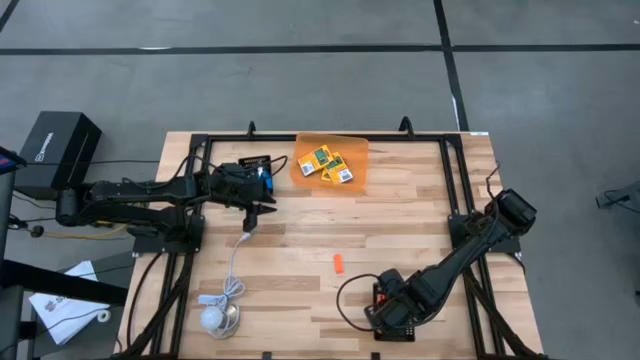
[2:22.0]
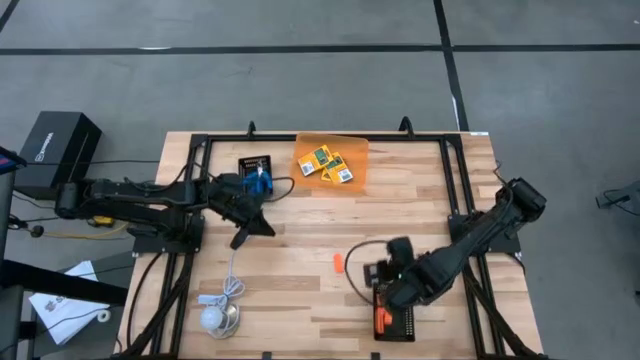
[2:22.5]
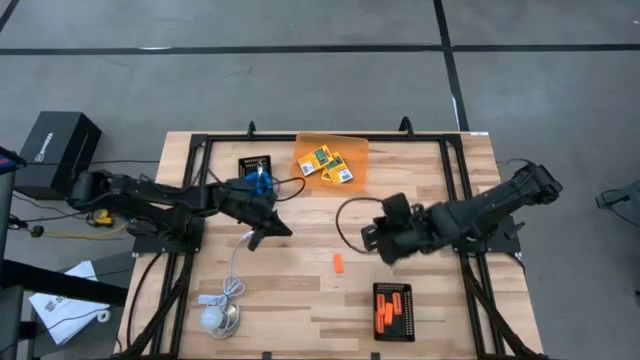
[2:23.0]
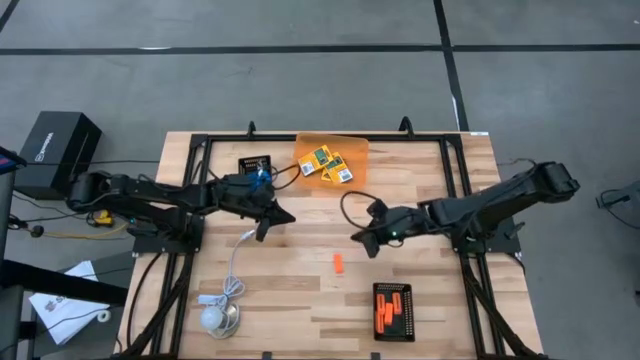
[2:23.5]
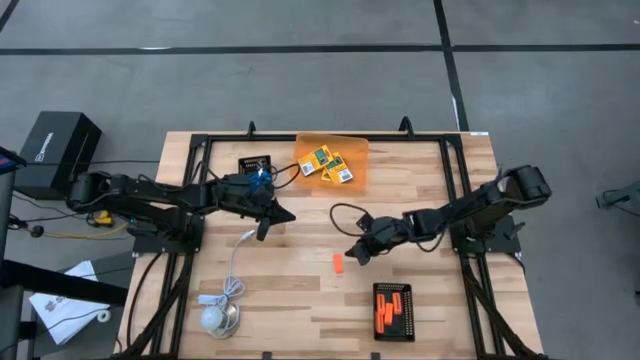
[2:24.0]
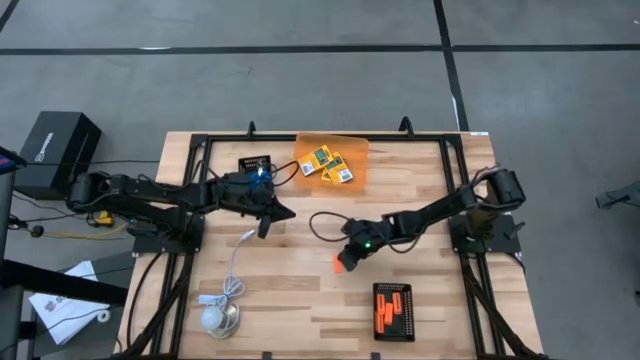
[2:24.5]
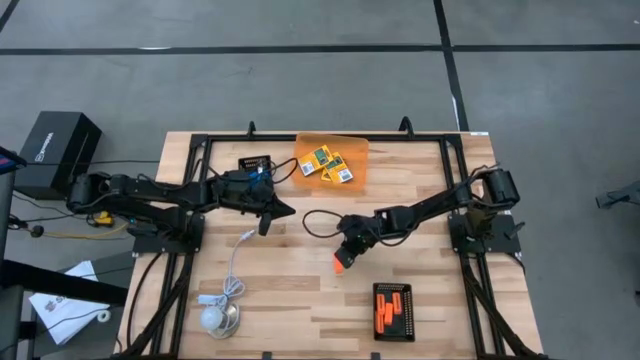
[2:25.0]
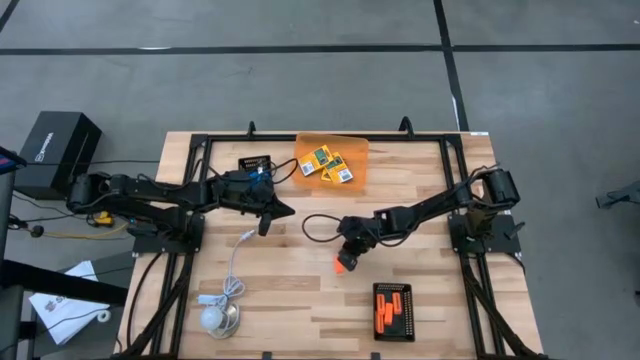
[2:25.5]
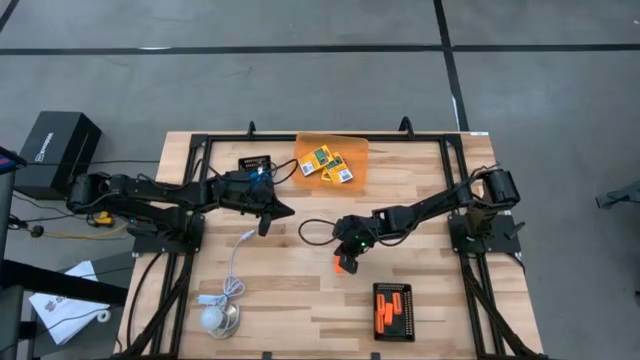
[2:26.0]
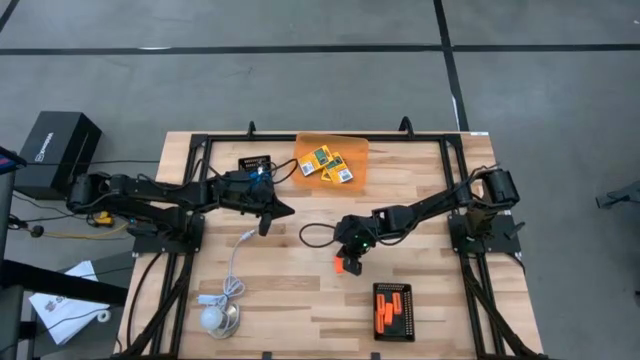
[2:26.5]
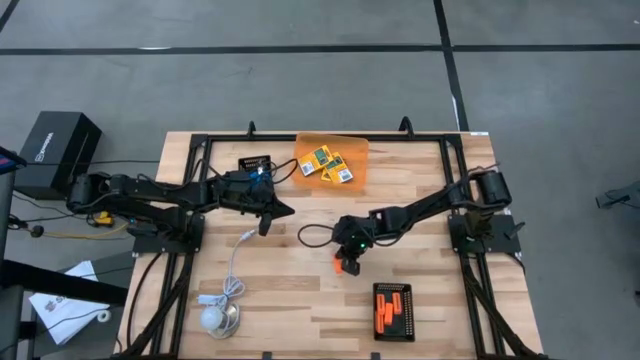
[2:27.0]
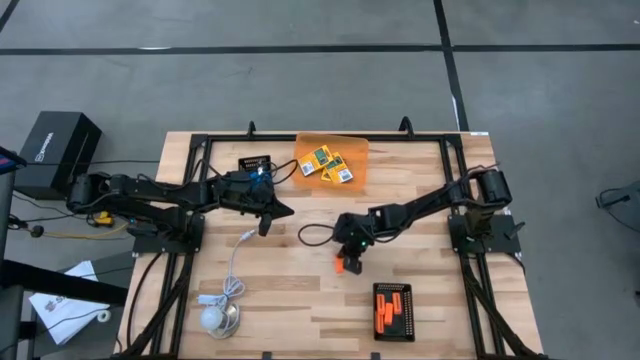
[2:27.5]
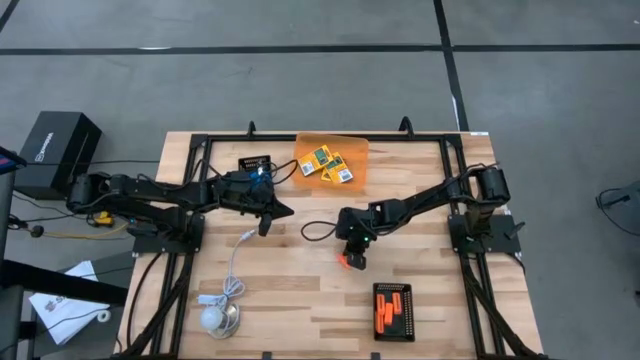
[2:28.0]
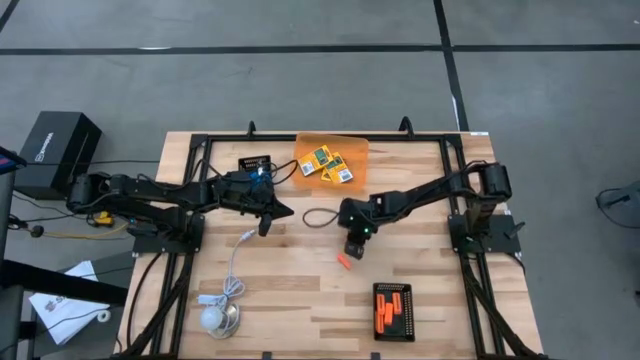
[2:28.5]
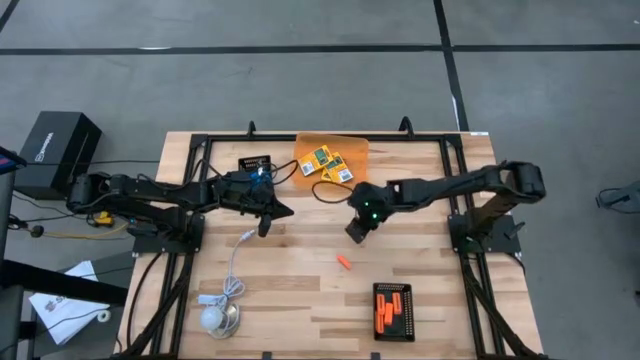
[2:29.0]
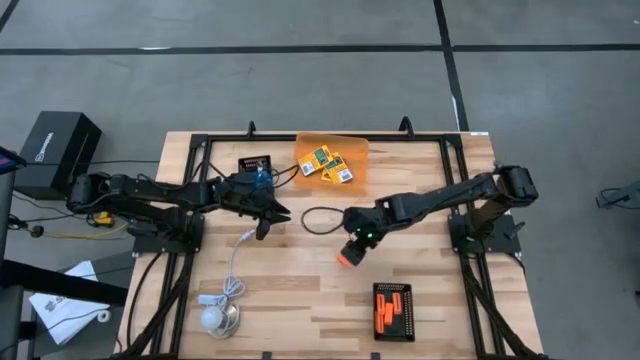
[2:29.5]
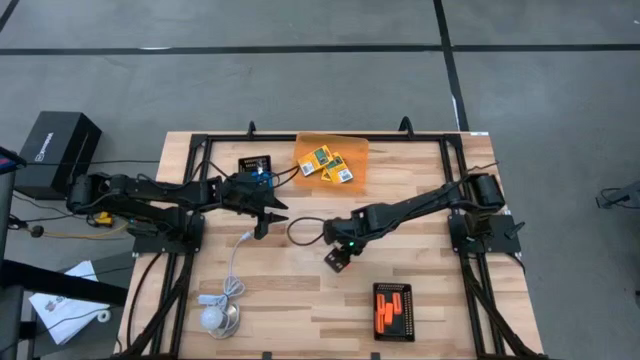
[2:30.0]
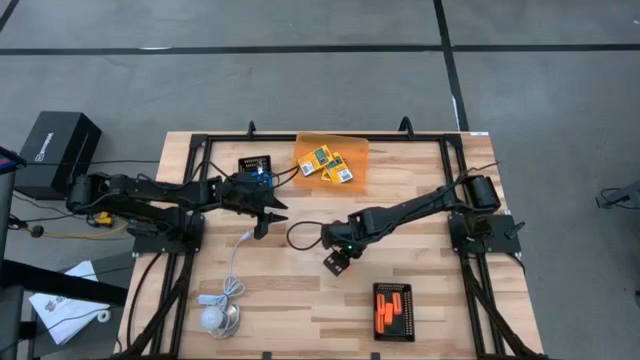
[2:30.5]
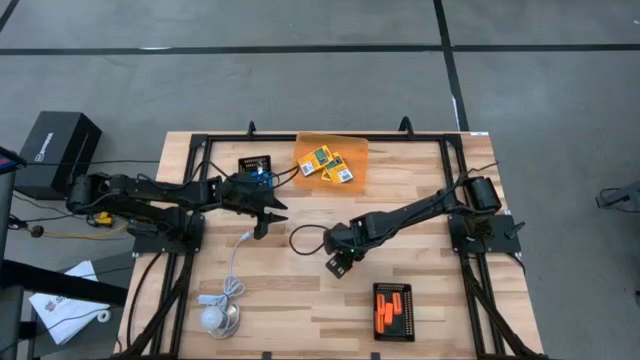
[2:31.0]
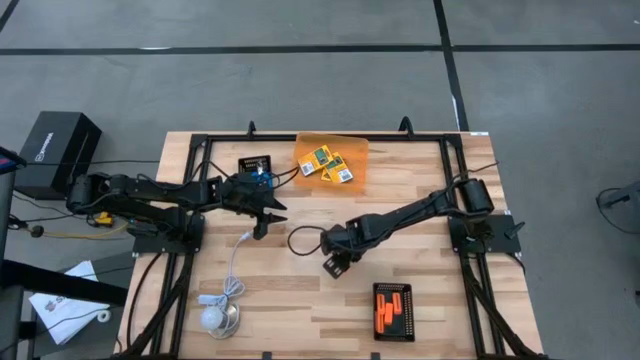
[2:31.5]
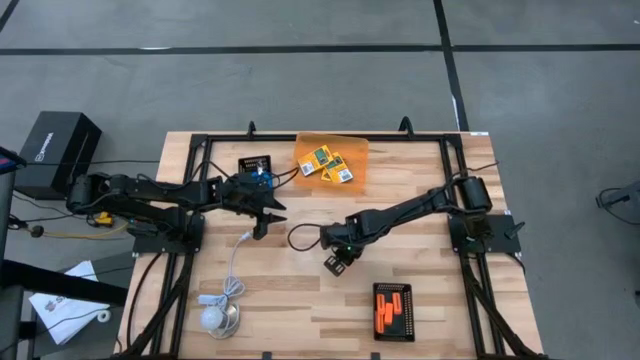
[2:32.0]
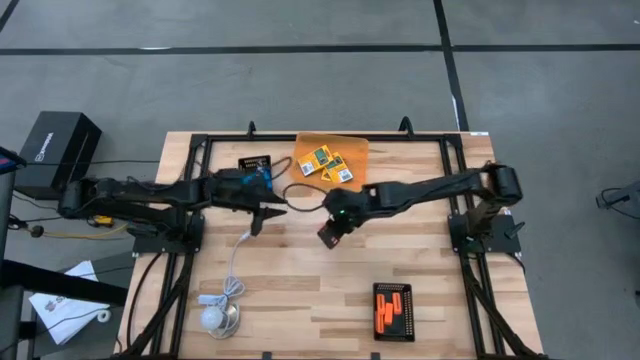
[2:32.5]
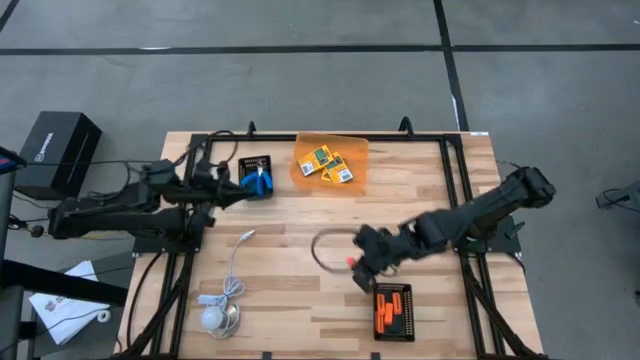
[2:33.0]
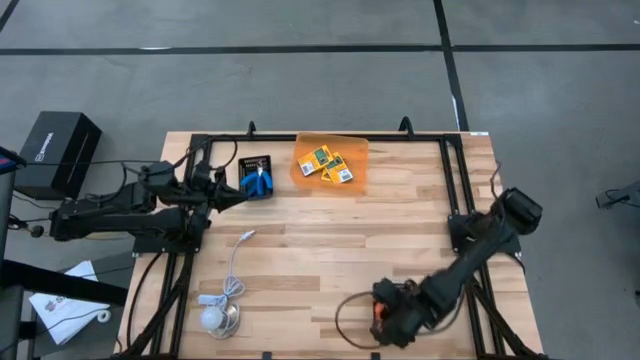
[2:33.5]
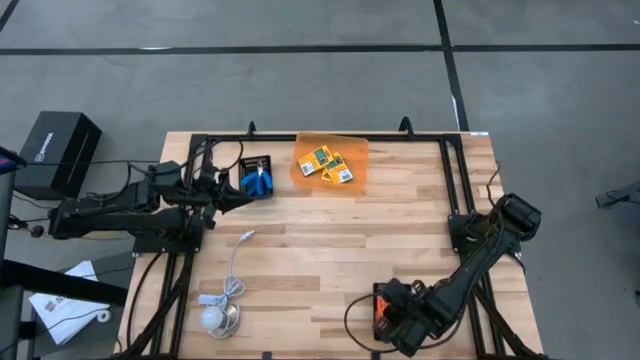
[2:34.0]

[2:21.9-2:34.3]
Task: Pick & Place School Supplies
Put the eraser into the bottom black bin

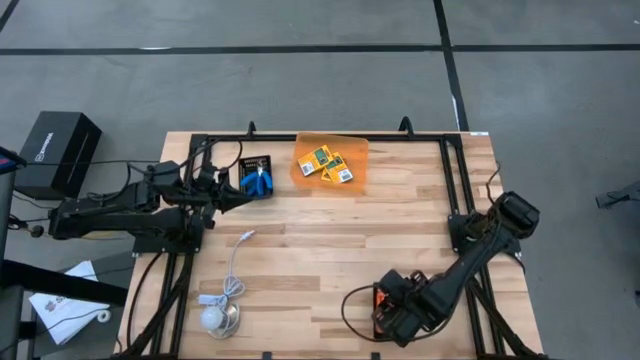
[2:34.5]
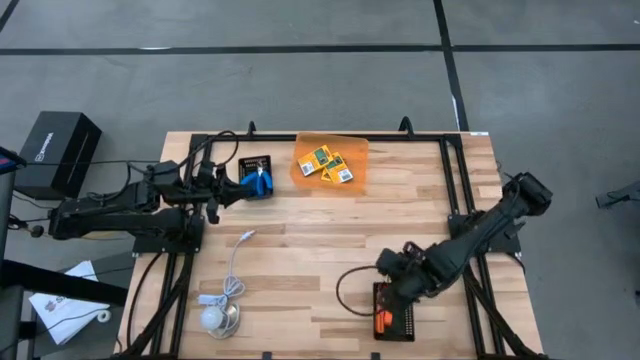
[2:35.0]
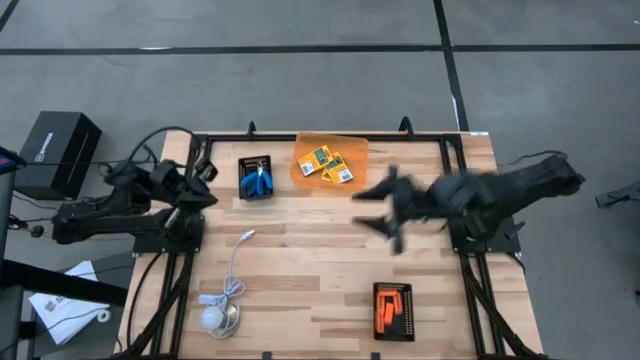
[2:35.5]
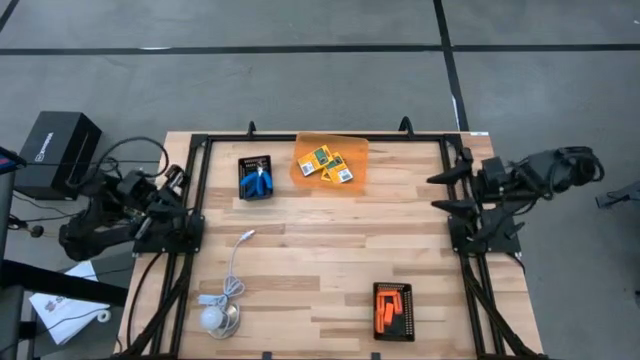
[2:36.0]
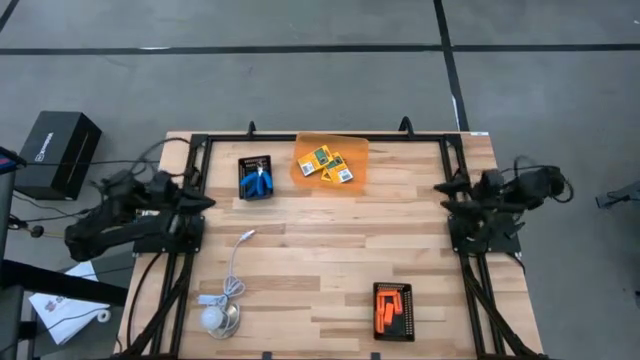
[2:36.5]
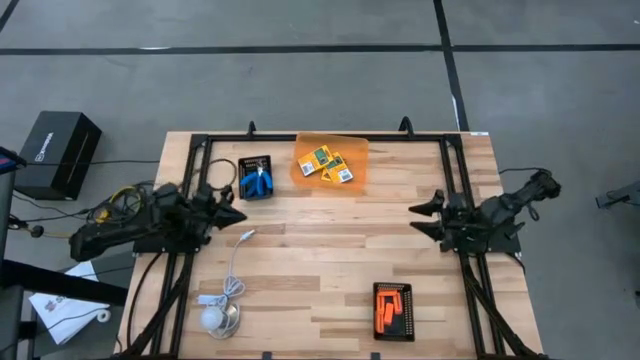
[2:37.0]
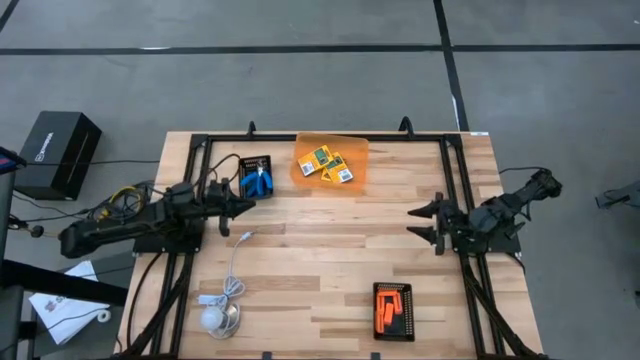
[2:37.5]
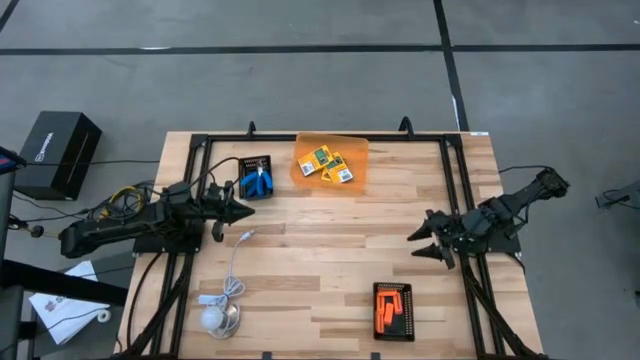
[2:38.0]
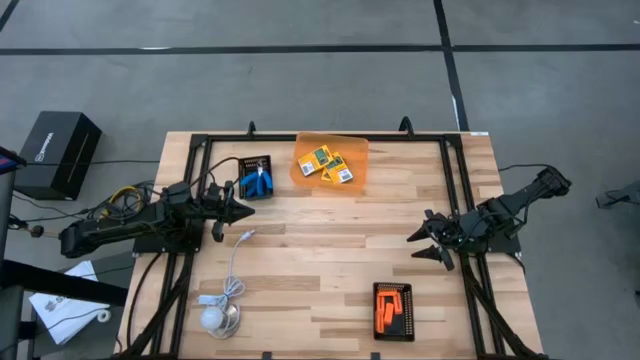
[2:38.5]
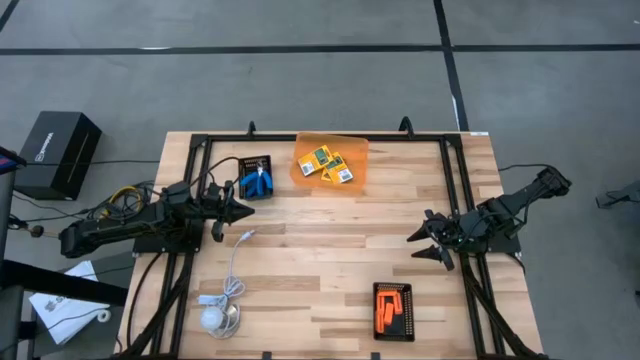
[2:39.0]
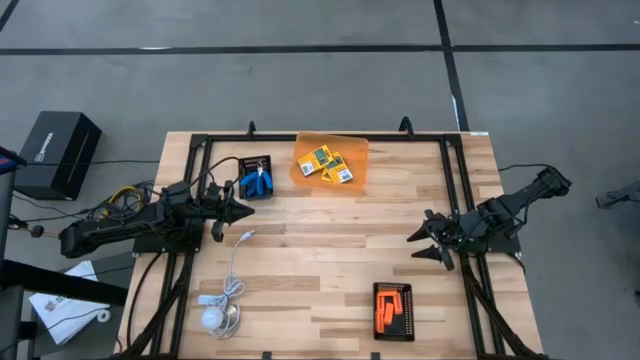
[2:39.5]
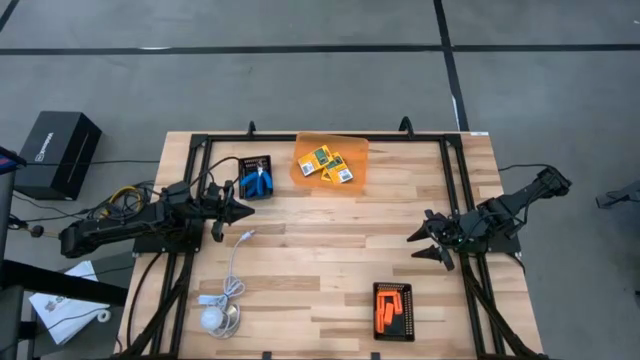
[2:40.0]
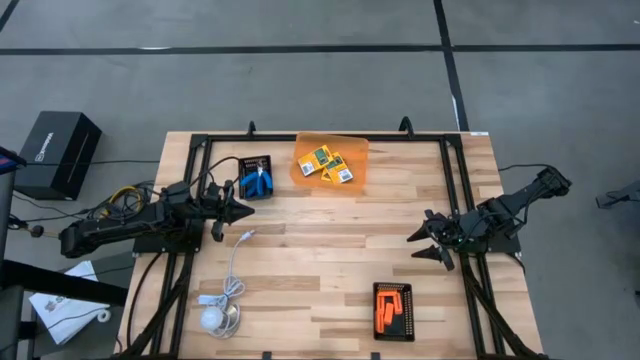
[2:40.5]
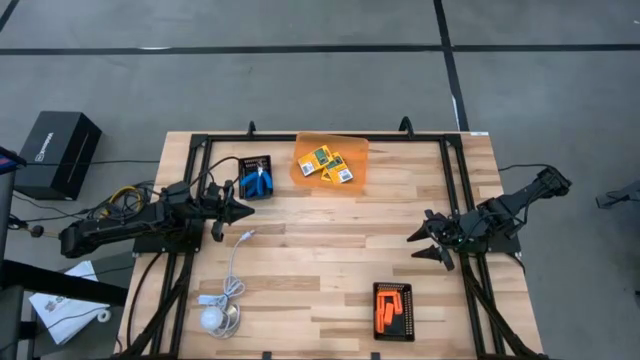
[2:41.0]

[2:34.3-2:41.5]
Return to Home Position

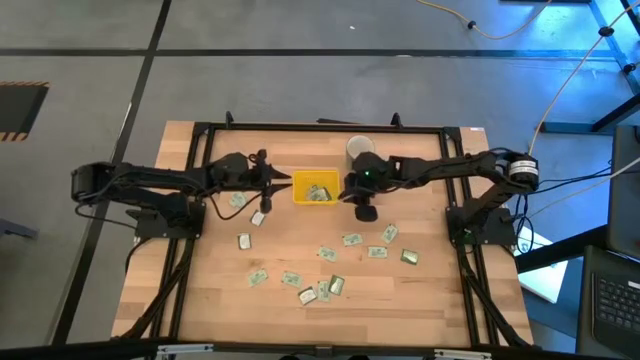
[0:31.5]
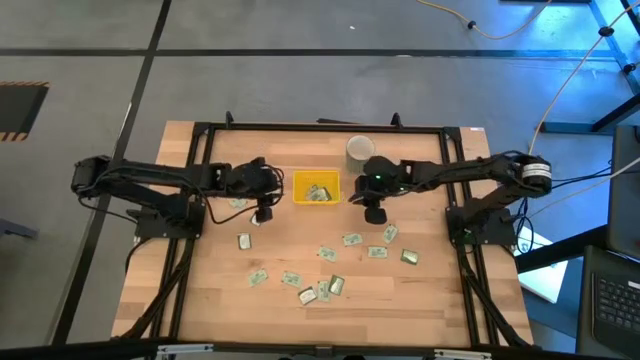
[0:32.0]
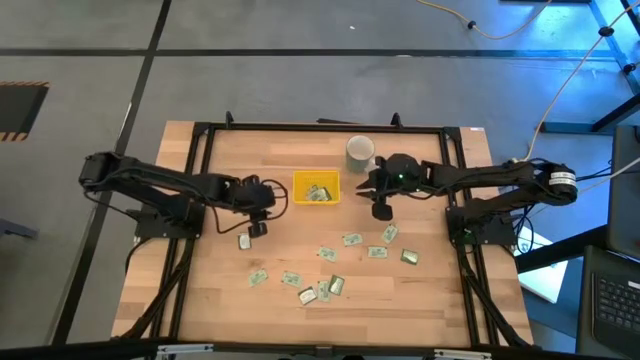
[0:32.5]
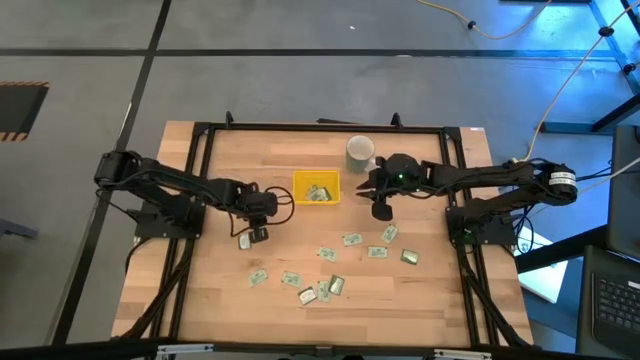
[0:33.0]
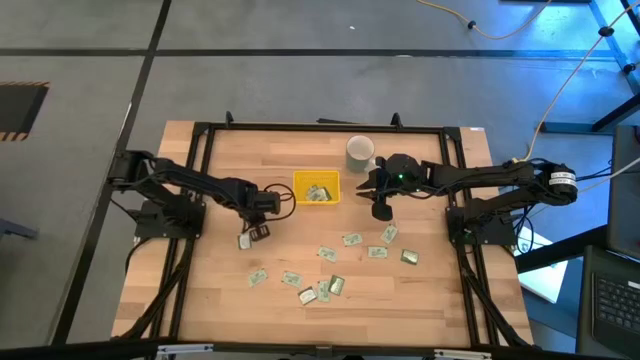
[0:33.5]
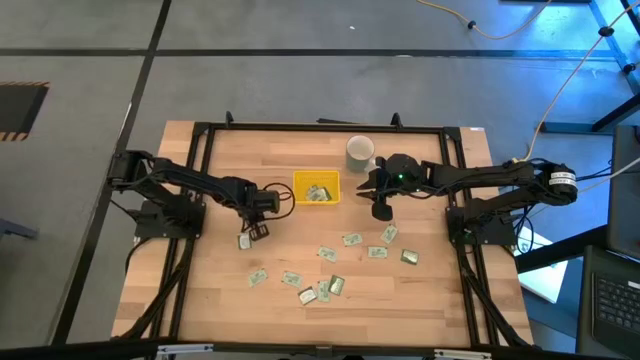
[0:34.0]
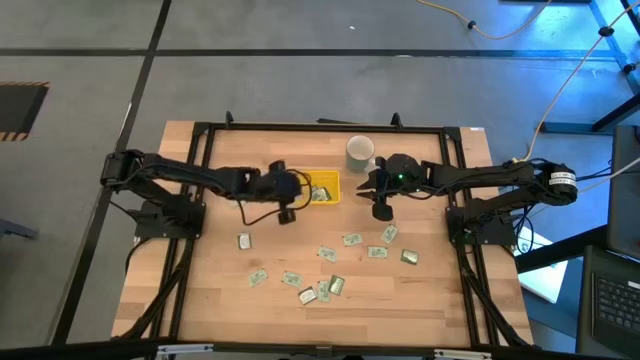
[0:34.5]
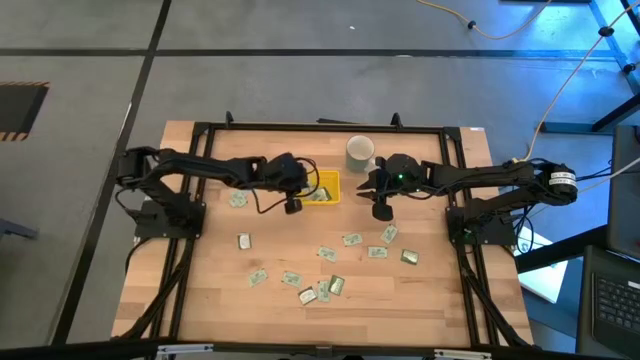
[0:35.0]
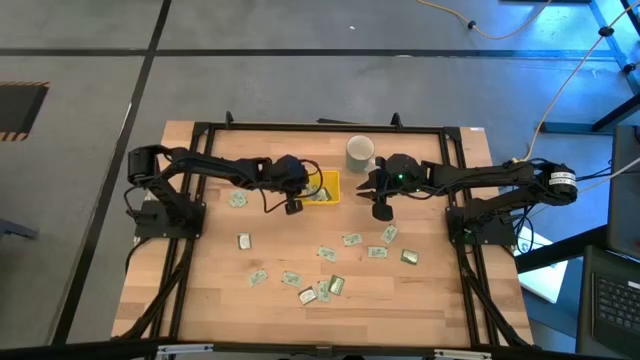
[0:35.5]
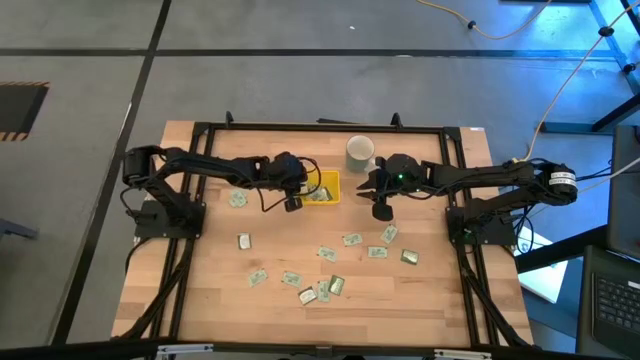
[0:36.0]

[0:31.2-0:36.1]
Task: Pick and place Stevia / Truvia into bins
Put the top left truvia tea packet into the yellow bin
